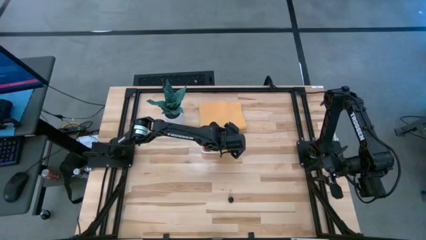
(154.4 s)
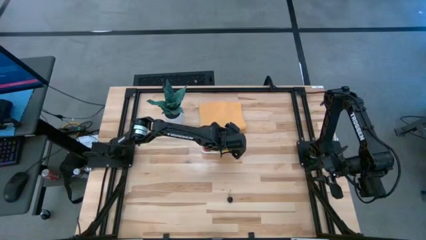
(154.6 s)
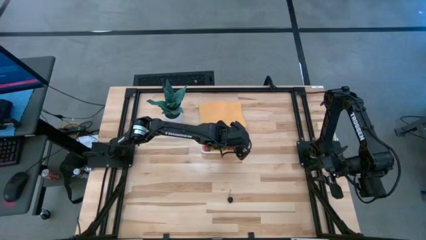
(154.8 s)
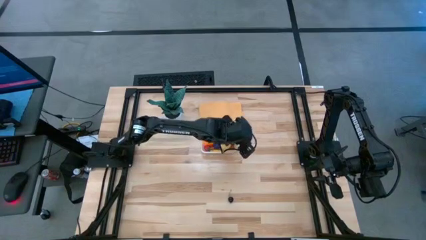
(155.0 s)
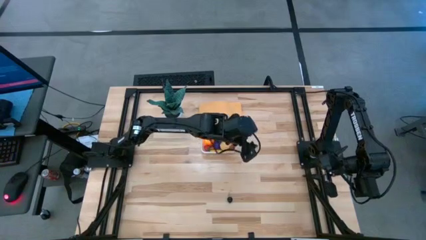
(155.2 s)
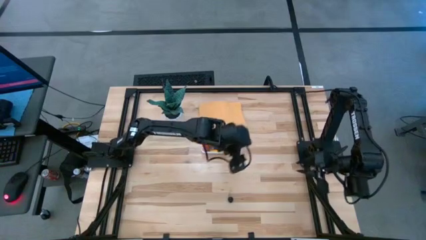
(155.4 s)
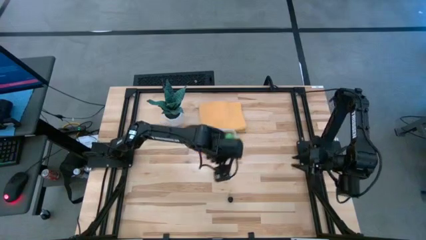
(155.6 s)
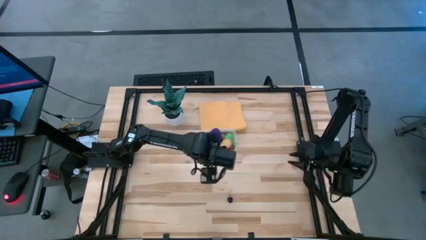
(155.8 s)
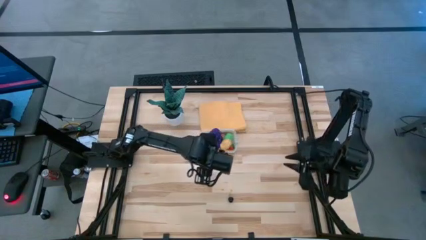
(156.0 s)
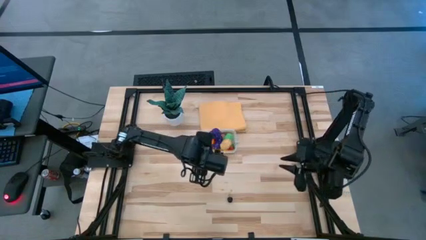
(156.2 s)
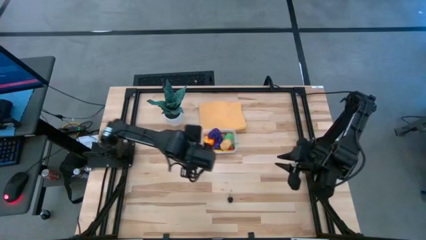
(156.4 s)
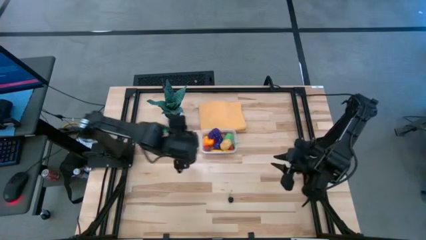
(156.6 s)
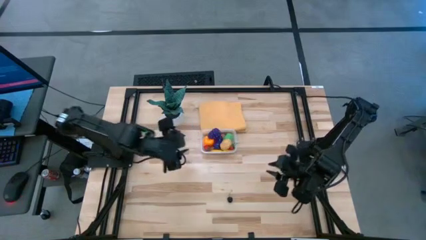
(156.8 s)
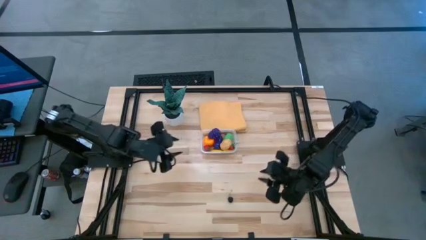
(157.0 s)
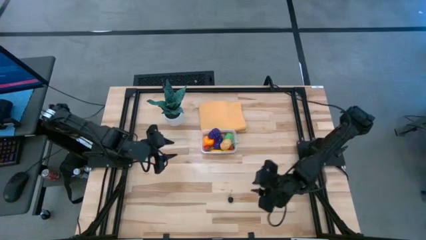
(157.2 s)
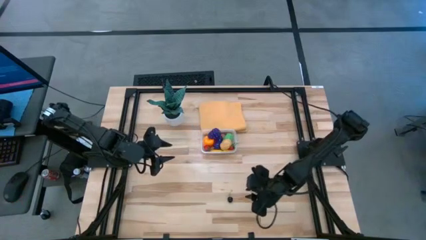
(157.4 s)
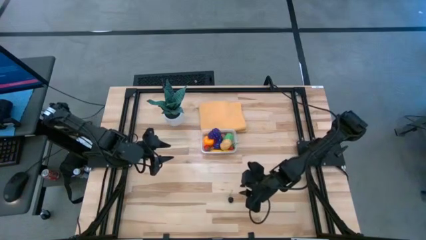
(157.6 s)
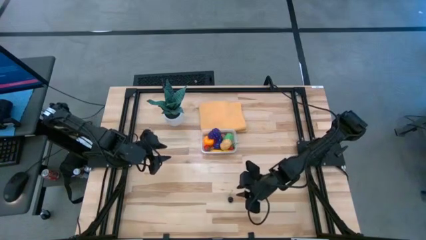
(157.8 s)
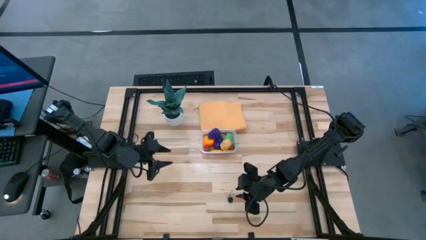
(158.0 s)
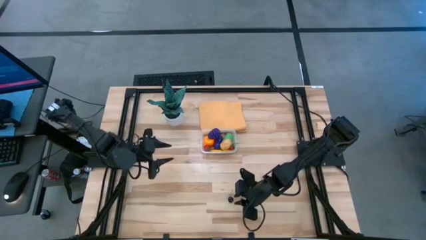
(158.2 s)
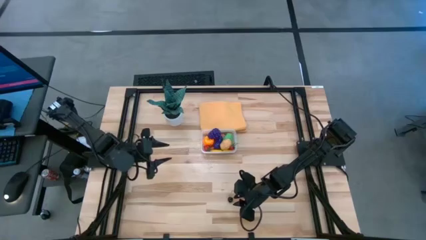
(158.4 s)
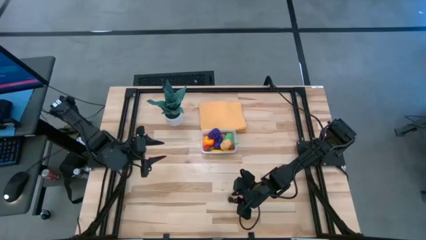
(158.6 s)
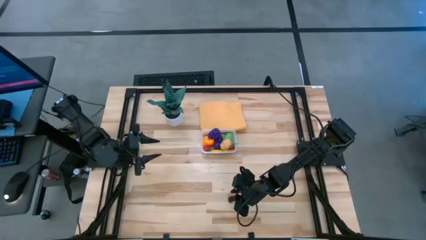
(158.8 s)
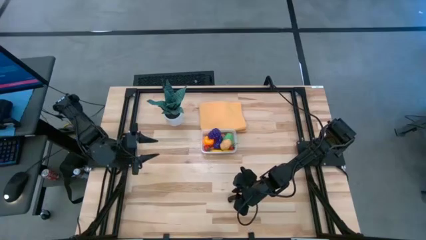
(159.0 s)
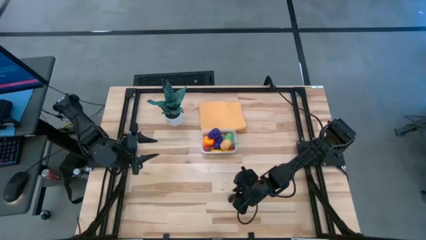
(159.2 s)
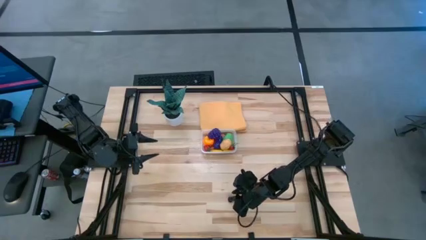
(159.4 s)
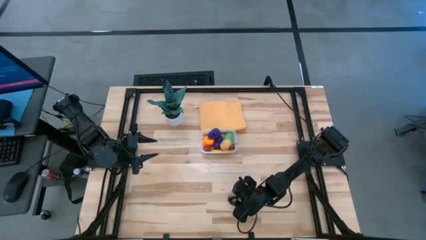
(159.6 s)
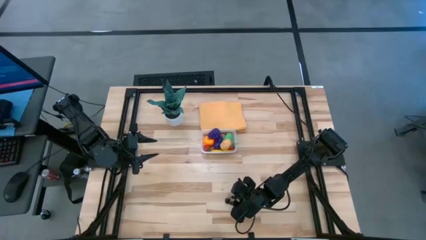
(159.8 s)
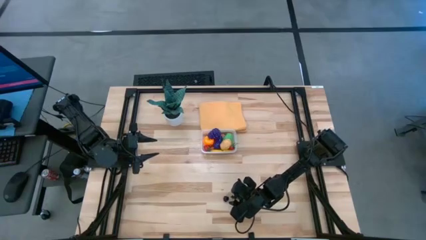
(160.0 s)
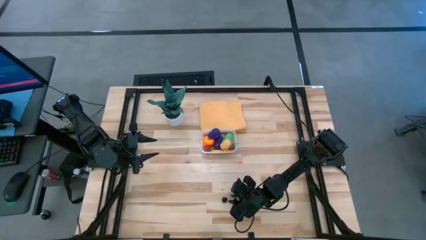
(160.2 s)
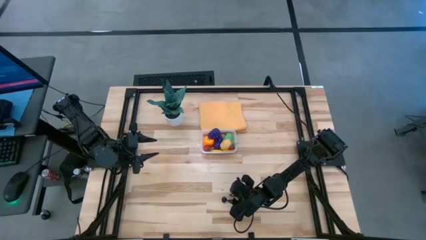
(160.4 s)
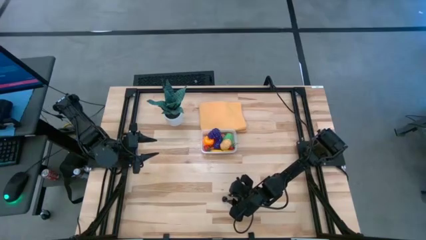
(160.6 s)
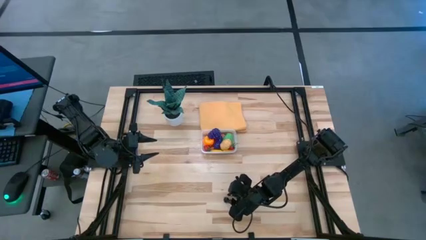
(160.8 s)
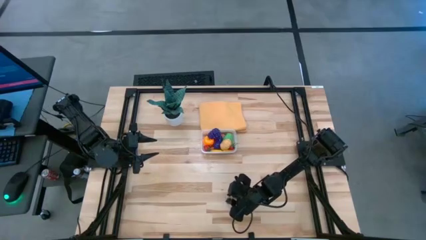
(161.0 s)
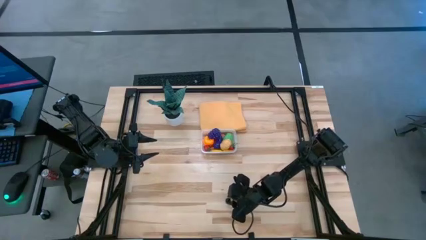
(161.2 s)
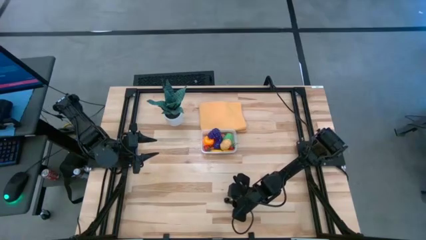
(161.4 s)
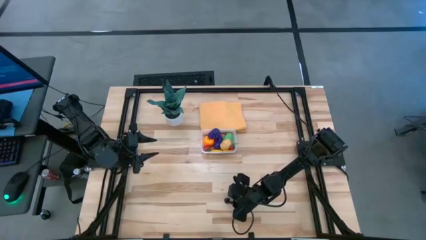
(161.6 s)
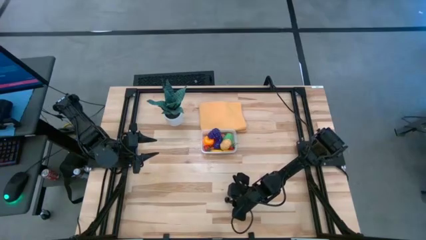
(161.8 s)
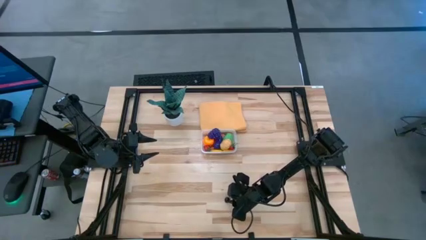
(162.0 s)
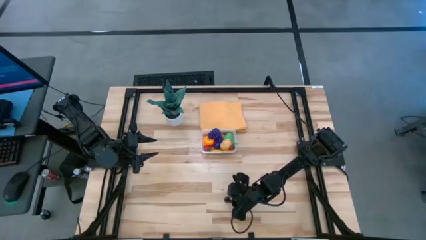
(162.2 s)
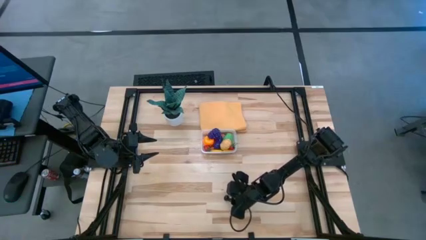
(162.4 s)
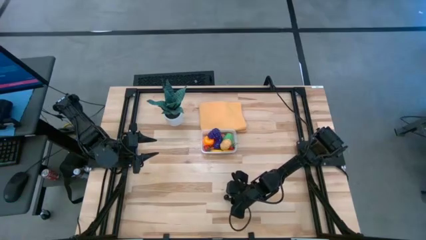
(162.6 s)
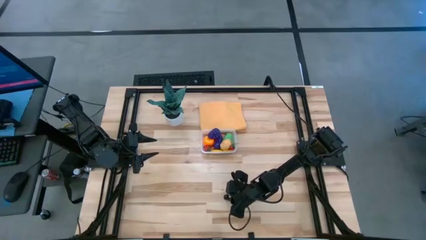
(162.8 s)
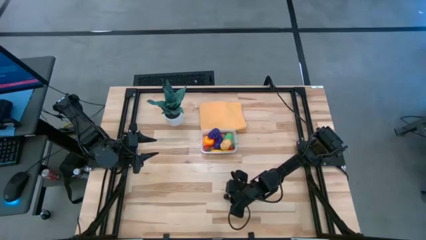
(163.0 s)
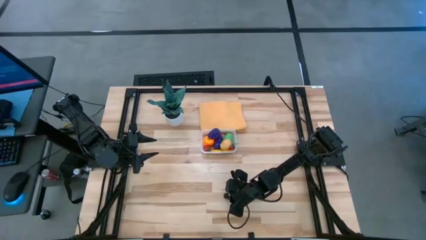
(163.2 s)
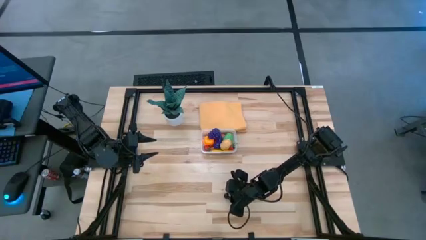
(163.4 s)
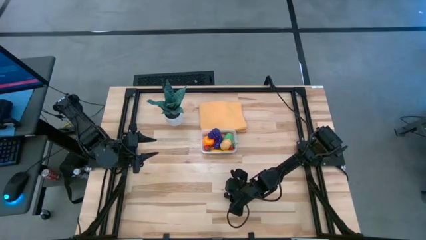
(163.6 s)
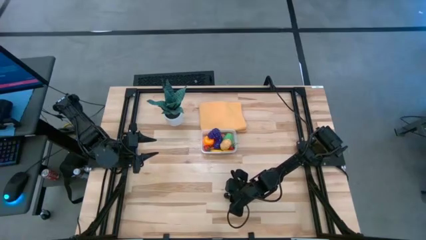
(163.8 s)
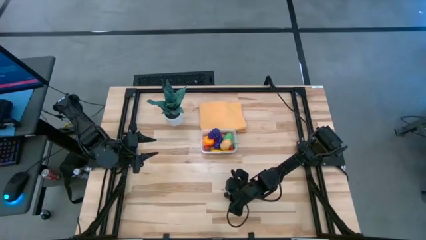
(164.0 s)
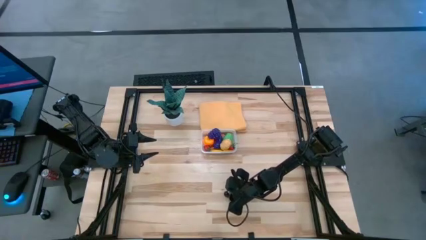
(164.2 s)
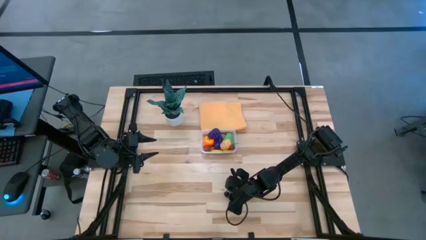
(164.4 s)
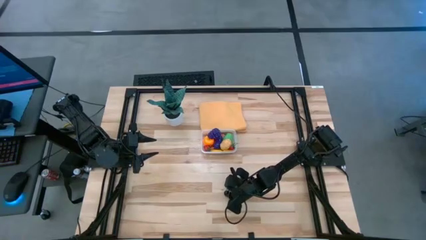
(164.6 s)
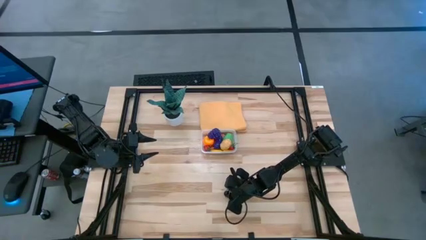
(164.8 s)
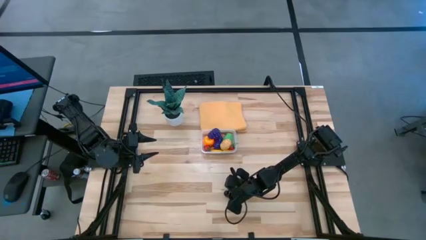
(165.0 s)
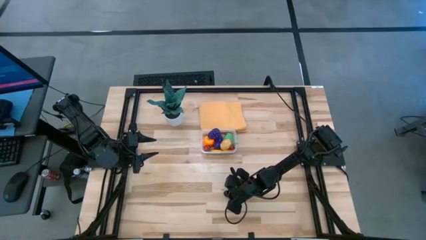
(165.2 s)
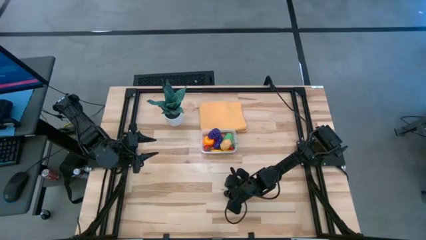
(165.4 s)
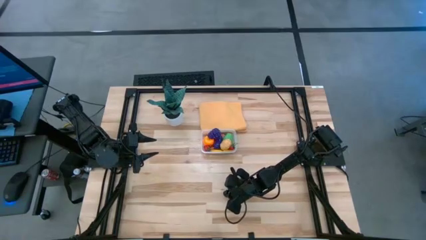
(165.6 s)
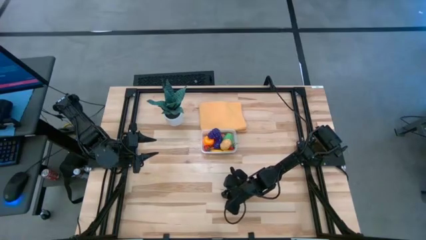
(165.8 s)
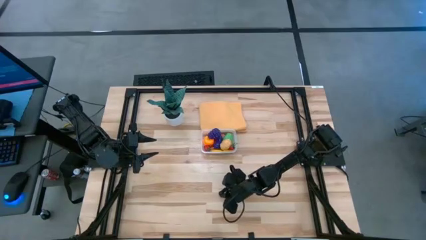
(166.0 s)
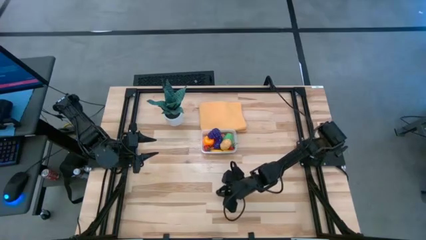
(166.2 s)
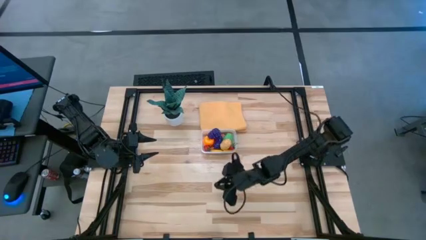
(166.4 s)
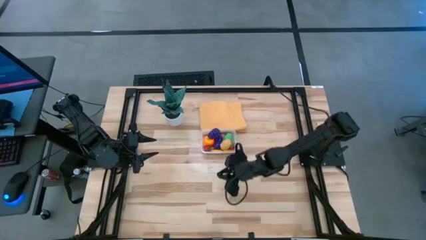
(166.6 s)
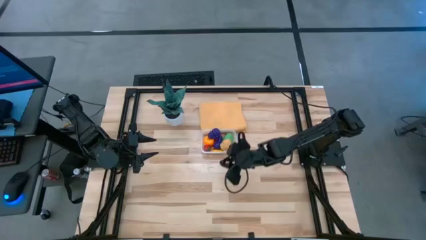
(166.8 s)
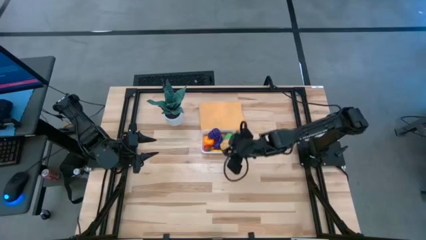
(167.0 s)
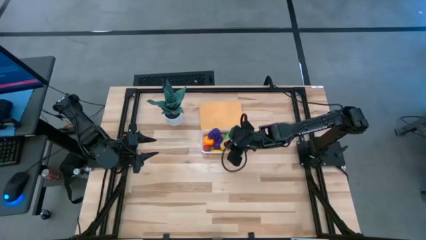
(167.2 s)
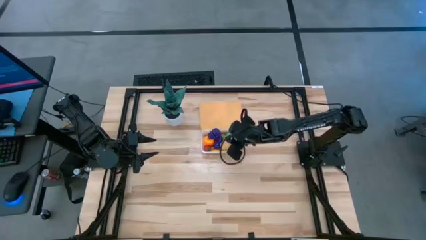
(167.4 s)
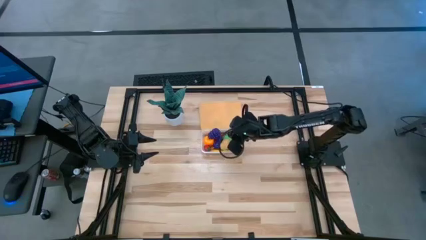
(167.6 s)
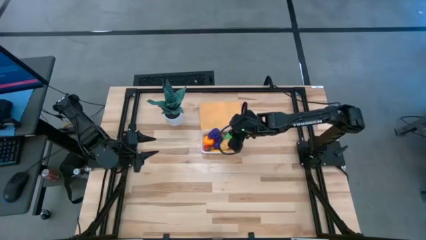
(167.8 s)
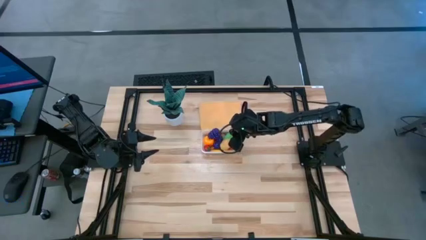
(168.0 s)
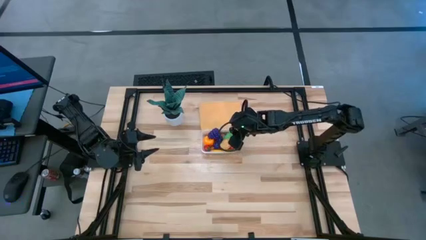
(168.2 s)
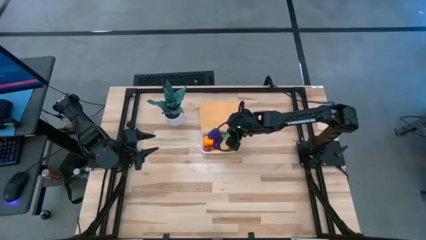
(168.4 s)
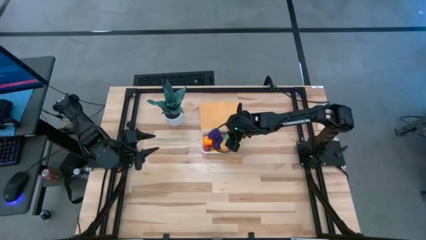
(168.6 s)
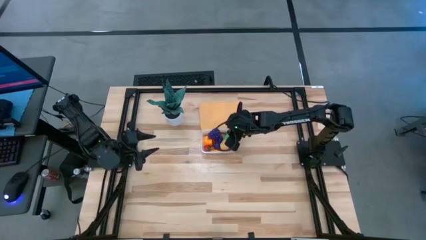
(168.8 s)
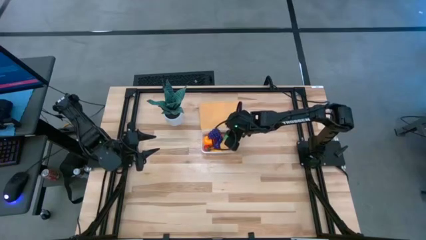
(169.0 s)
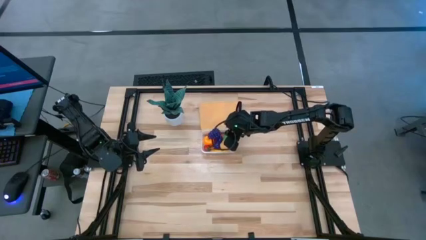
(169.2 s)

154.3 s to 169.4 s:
Task: Pick and placing Produce into tupperware
Put the black cherry into the transparent bin

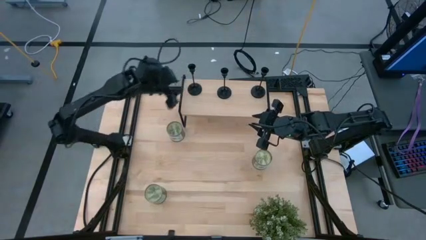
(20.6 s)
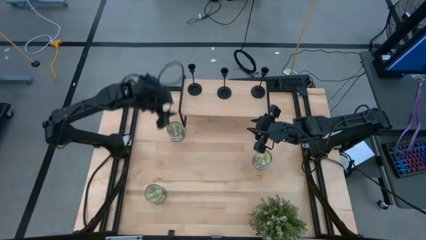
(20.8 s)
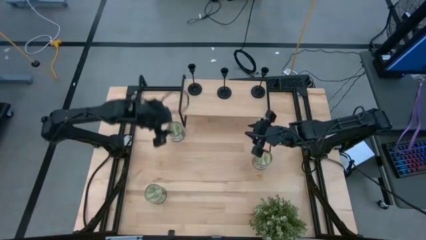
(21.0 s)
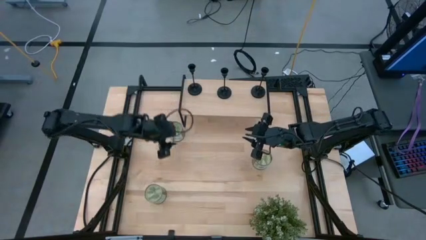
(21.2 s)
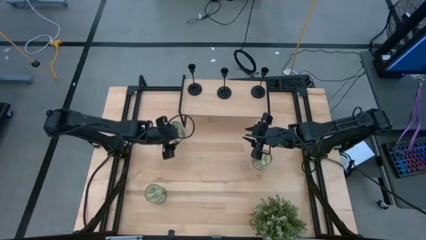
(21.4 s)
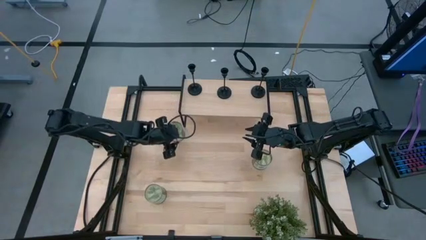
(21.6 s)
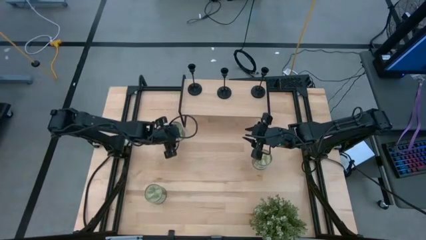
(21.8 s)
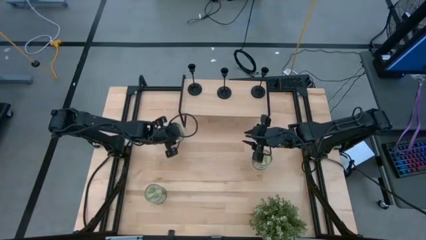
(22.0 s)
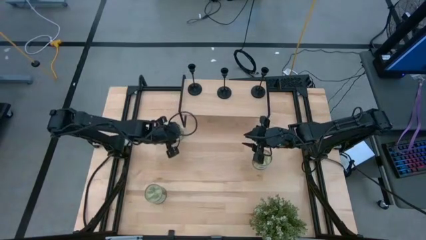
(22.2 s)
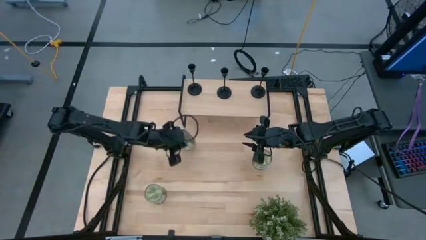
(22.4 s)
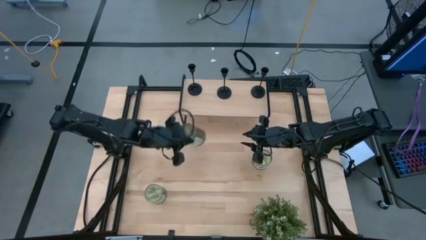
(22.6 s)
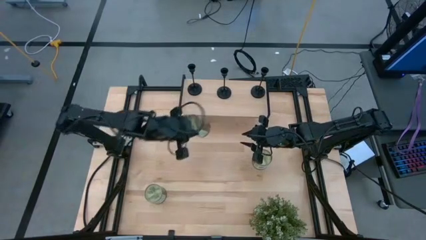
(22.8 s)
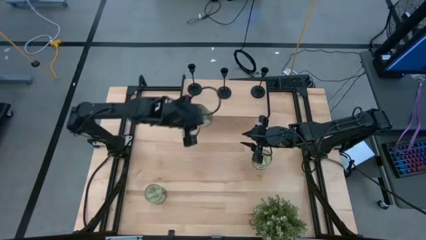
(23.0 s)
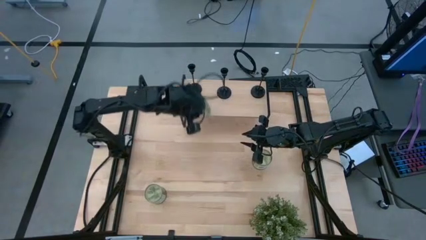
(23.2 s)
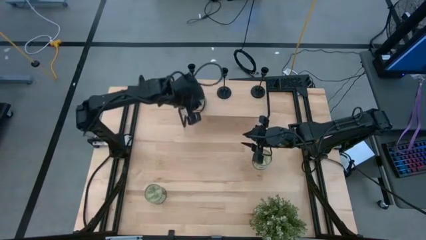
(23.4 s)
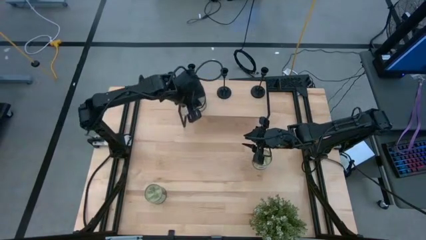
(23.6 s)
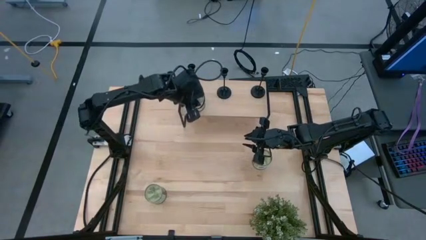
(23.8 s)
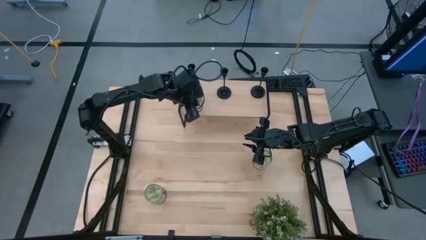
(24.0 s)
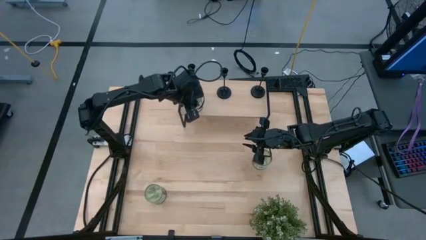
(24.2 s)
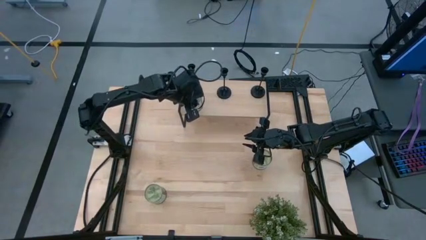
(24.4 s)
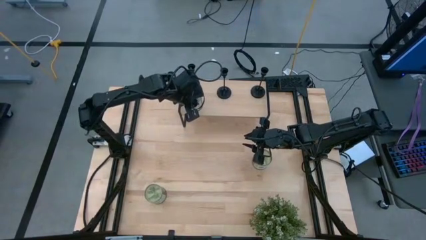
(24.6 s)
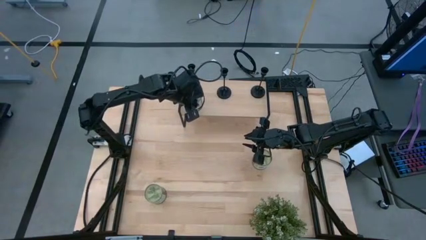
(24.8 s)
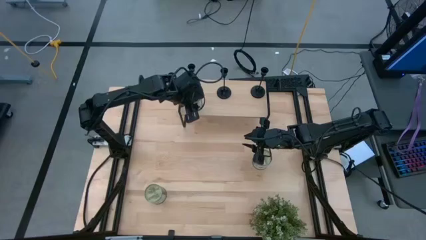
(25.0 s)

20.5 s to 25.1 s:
Task: Pick & Place candle stick holders
Put the top scented candle on the shelf
